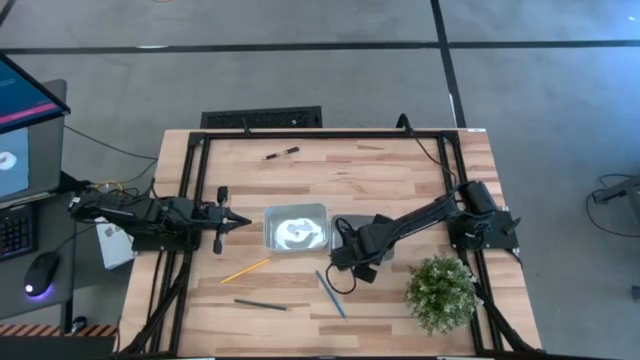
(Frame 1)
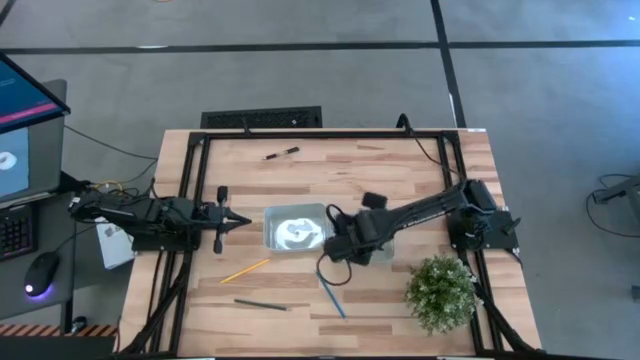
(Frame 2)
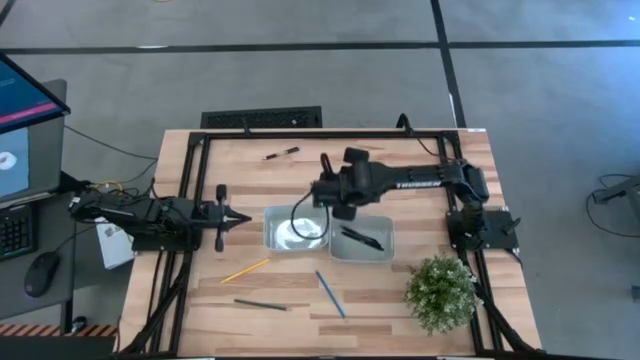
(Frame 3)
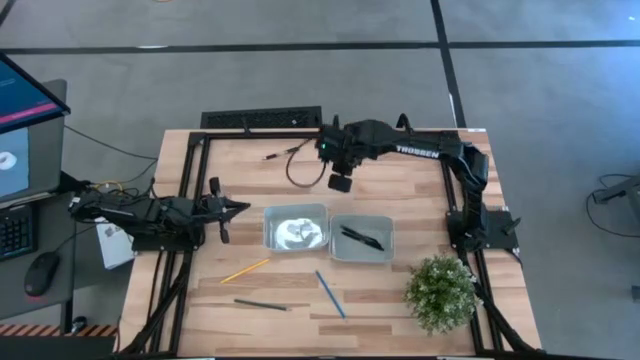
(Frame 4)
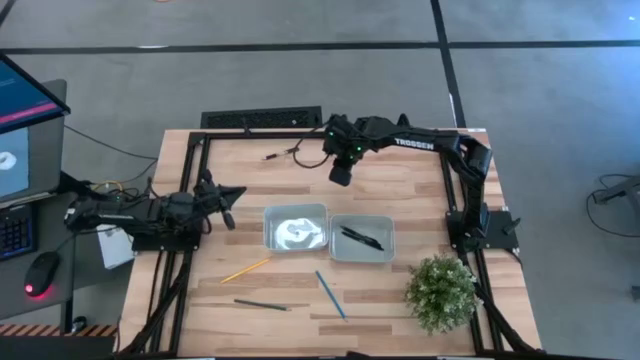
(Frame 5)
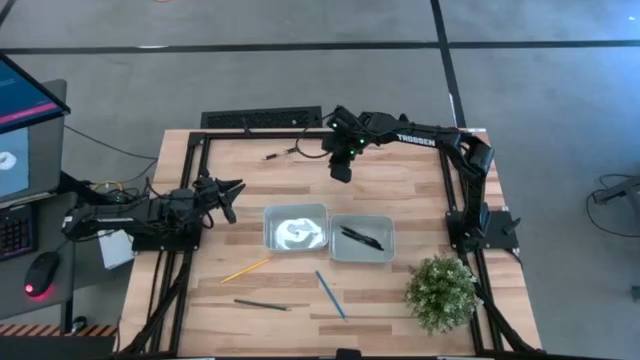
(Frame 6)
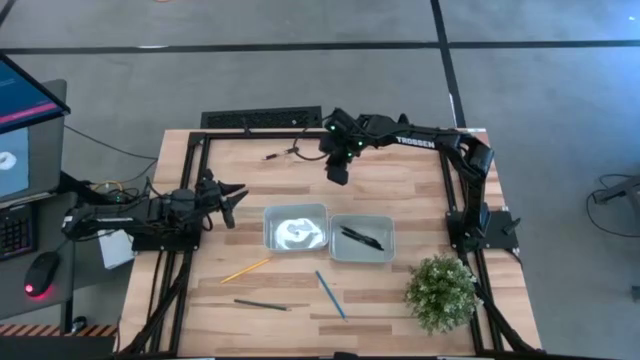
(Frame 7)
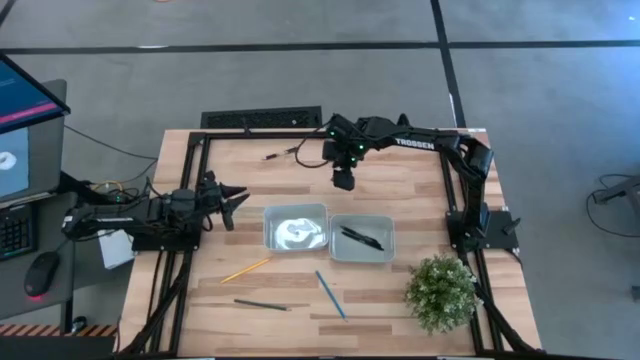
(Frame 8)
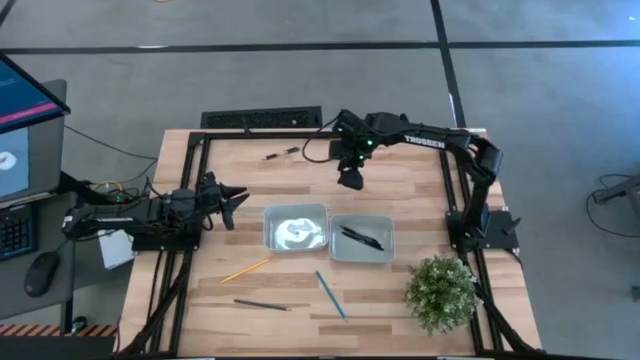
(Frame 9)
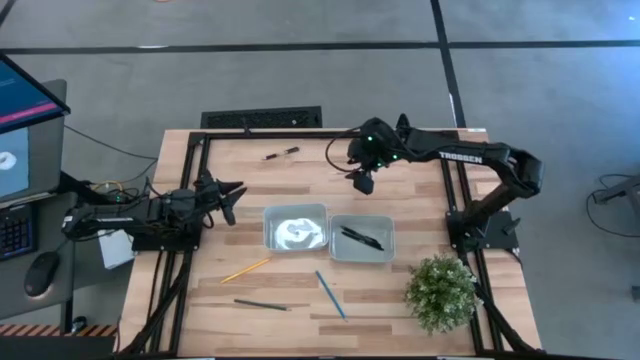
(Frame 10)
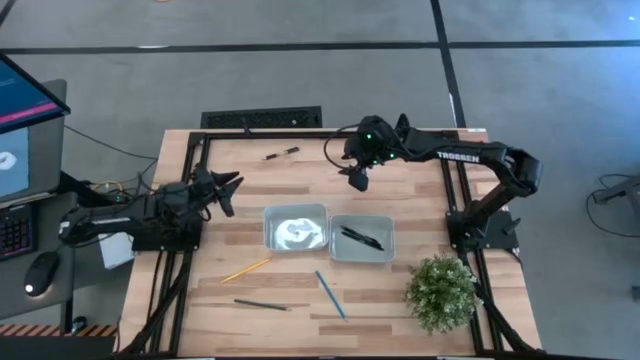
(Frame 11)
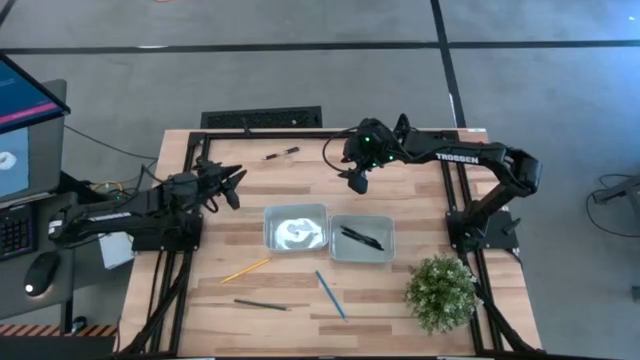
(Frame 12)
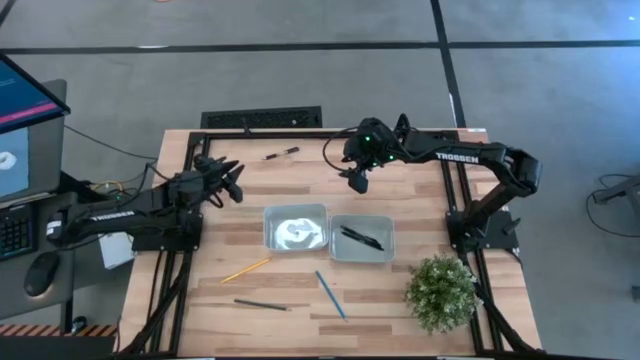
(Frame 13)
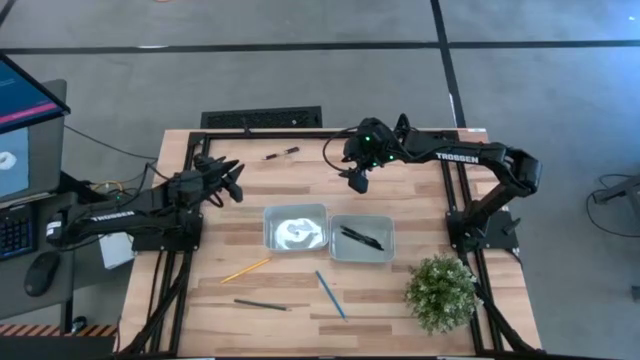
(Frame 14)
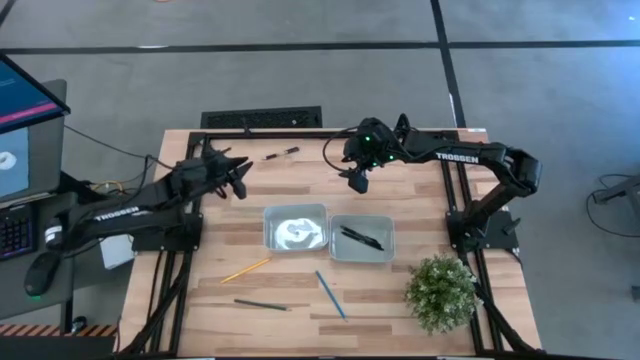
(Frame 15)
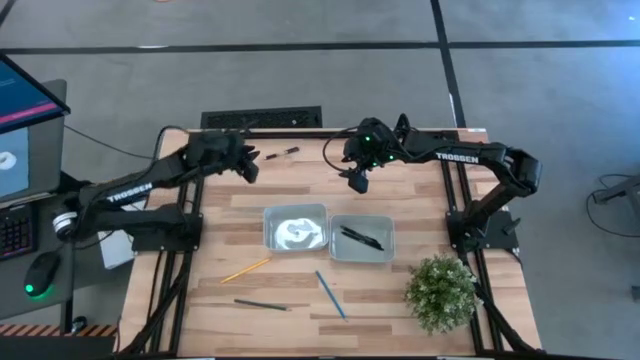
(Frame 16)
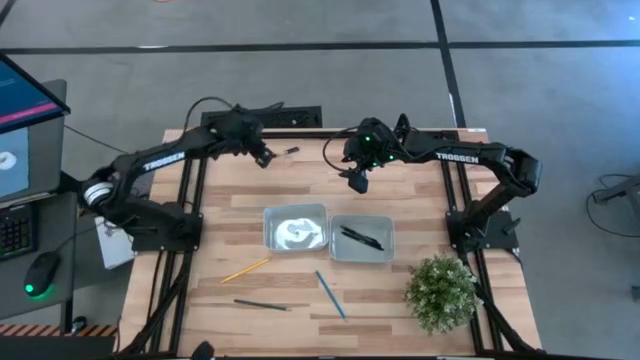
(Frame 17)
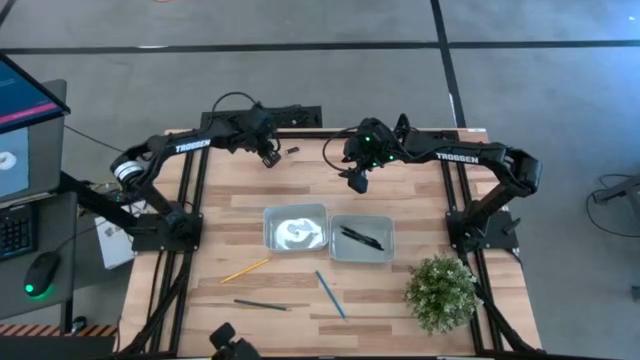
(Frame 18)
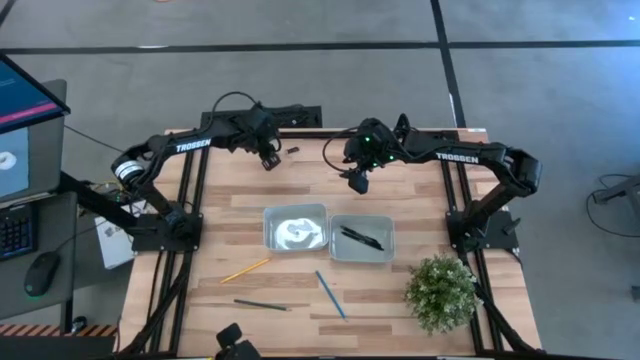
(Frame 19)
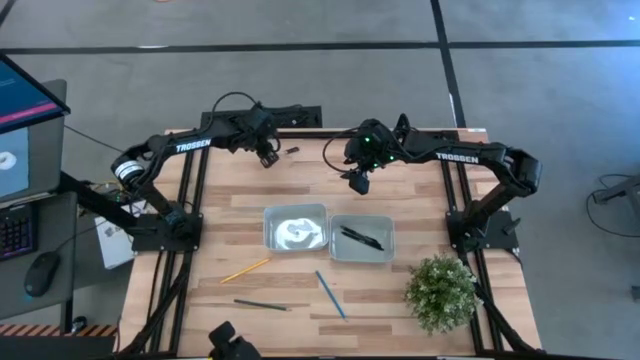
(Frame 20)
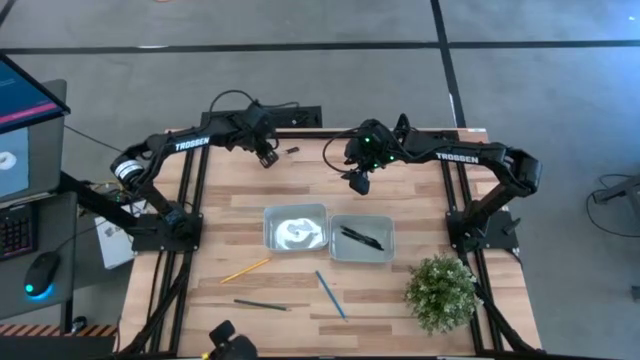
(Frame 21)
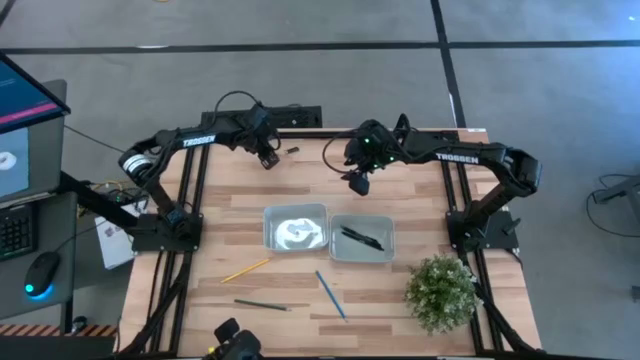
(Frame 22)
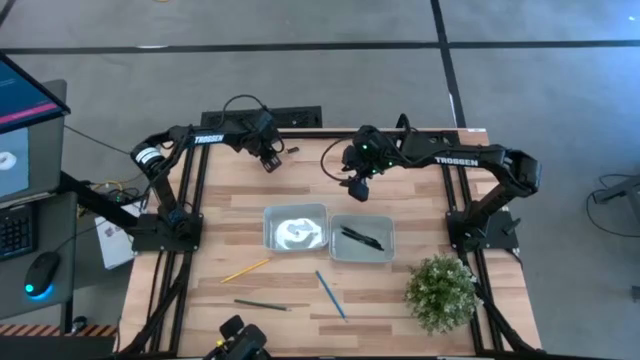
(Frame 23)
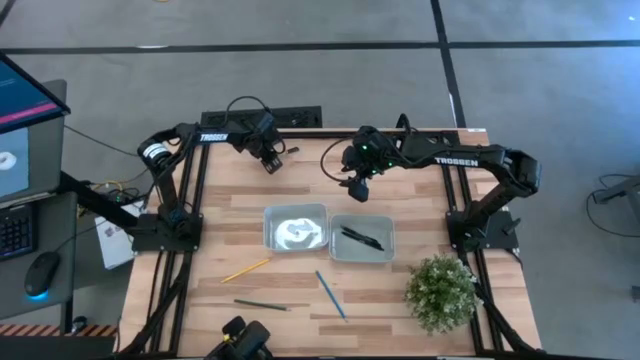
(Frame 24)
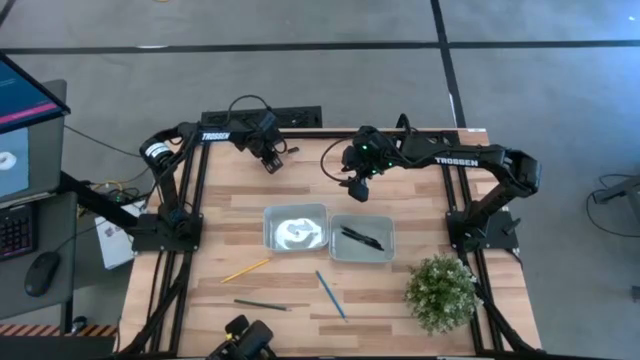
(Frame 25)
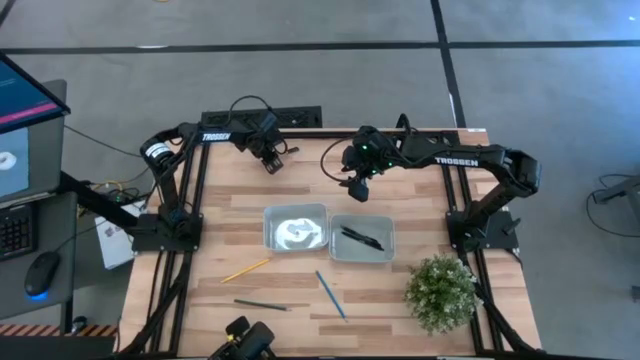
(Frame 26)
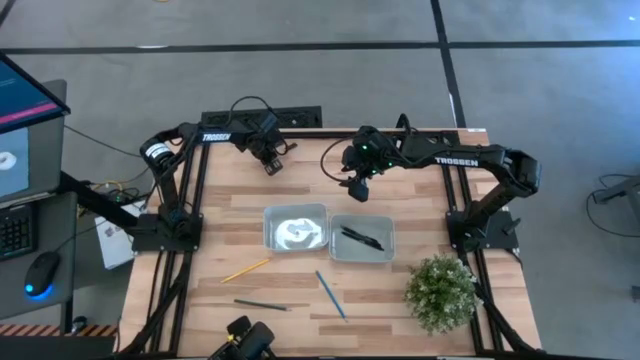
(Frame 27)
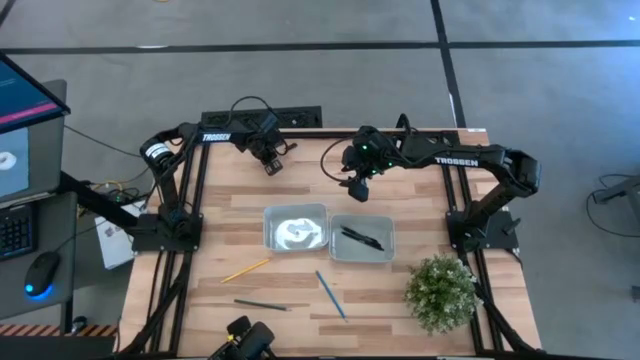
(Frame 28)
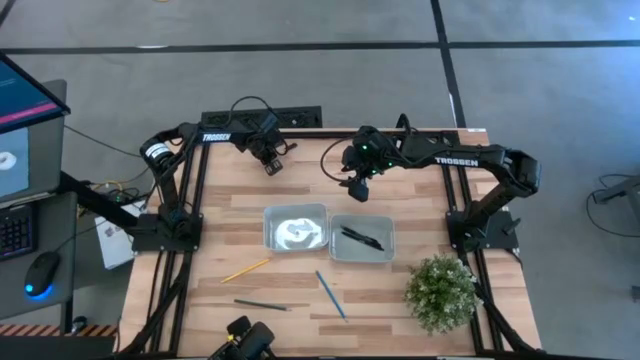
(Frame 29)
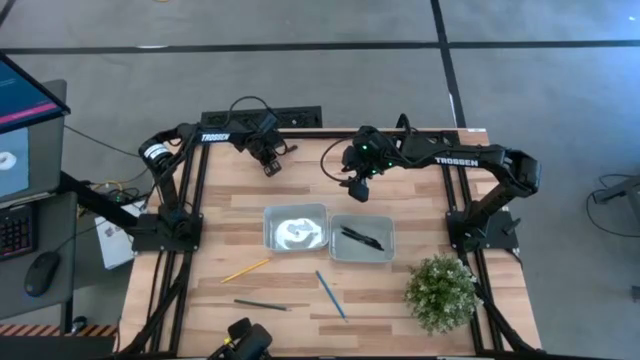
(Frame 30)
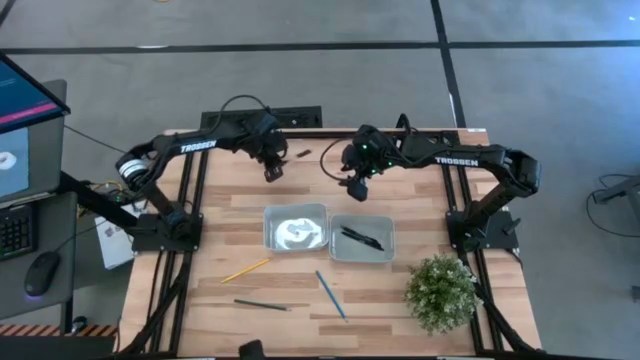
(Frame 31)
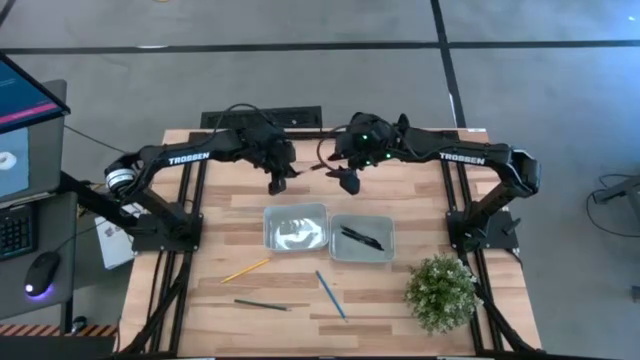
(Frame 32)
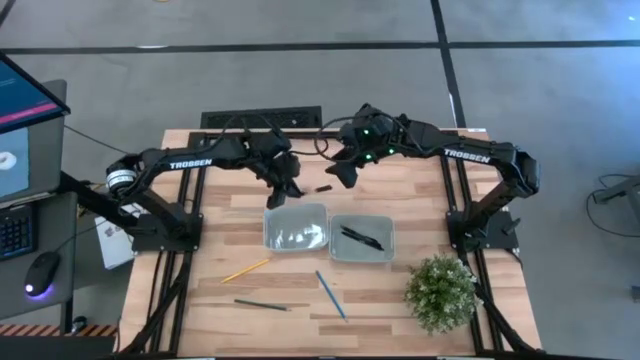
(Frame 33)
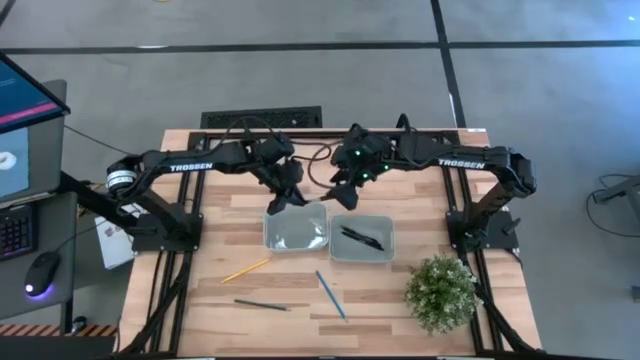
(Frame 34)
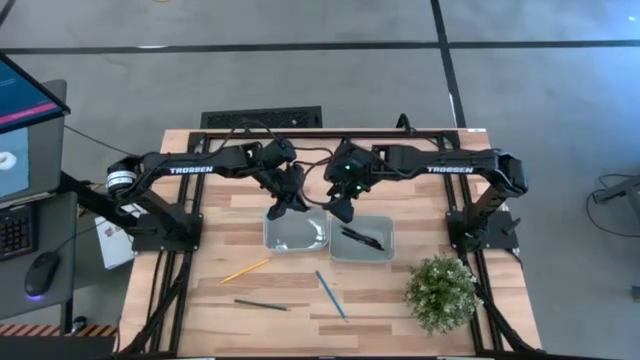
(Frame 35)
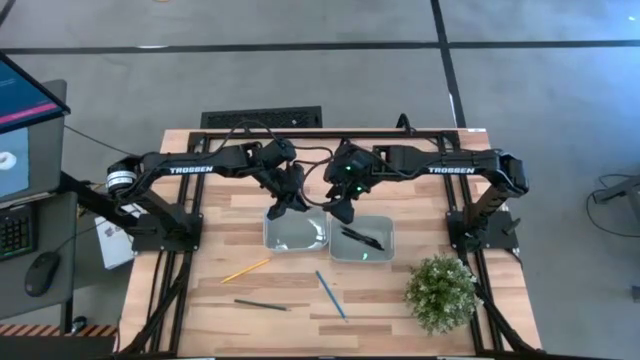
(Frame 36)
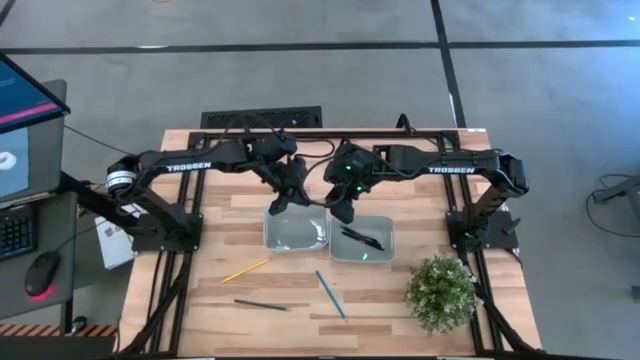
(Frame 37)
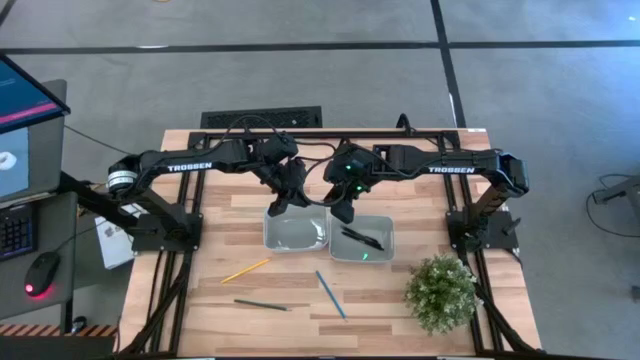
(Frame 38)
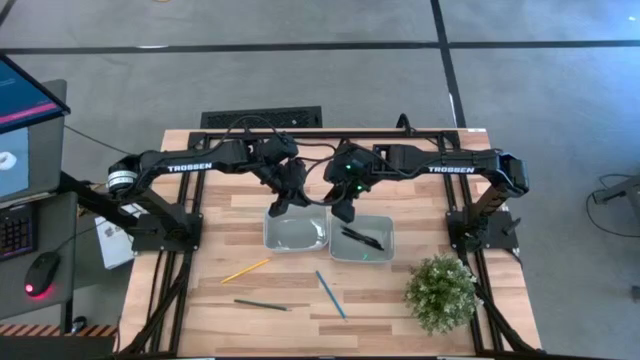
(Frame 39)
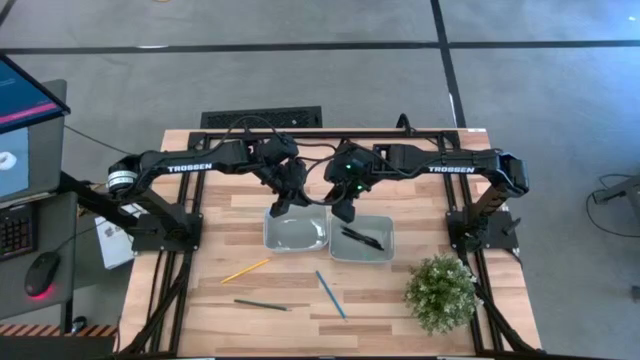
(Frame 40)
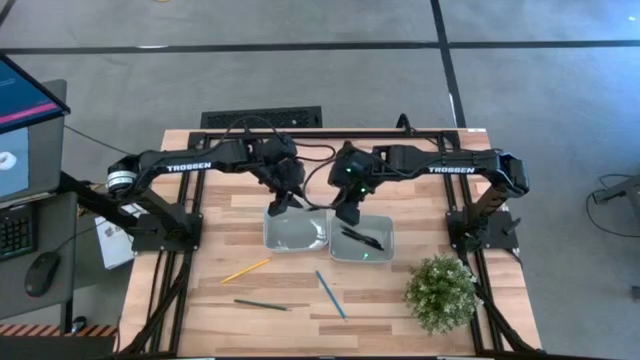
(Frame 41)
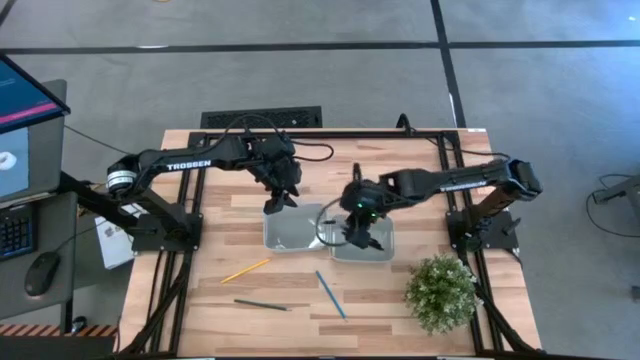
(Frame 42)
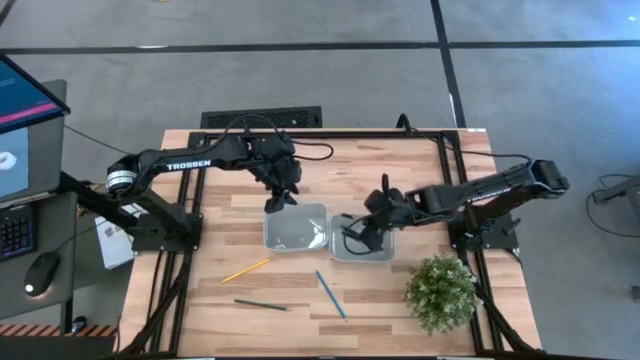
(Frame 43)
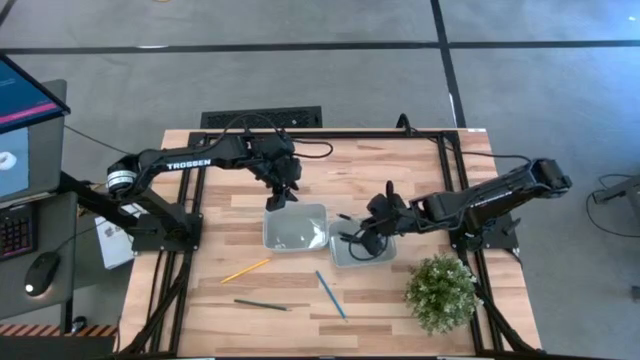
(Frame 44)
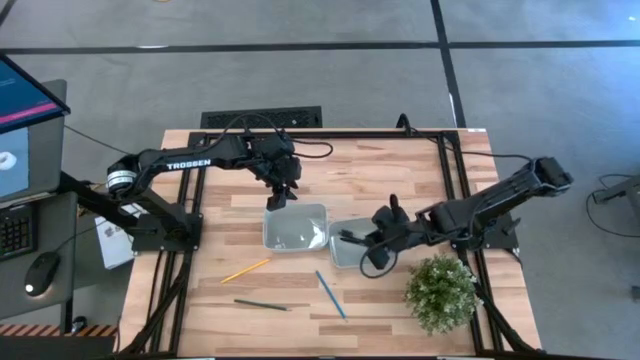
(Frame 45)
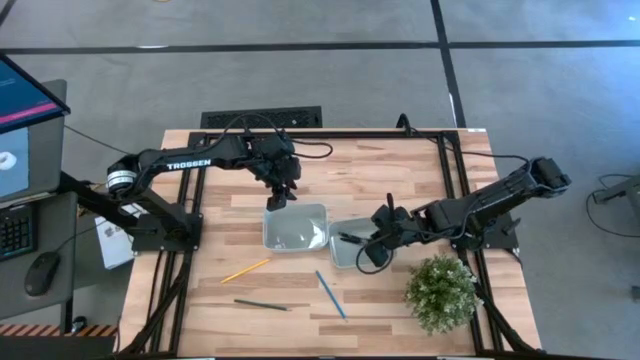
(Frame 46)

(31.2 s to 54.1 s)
Task: Sort pens & pencils
Put the black pen into the right gray bin
